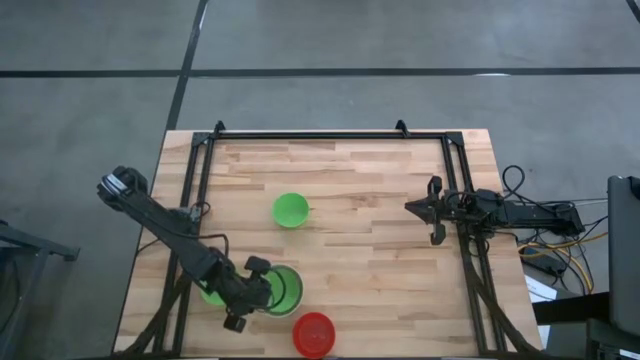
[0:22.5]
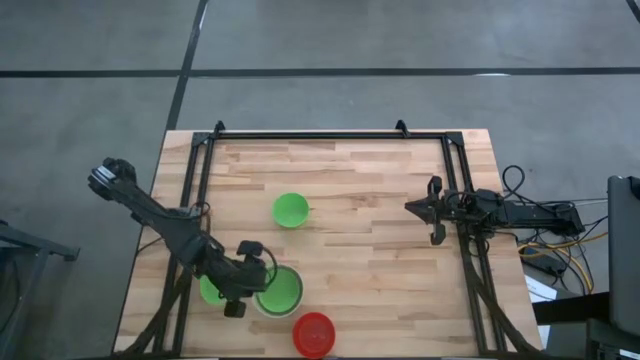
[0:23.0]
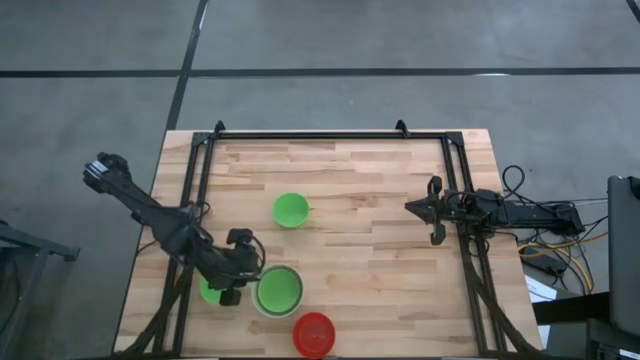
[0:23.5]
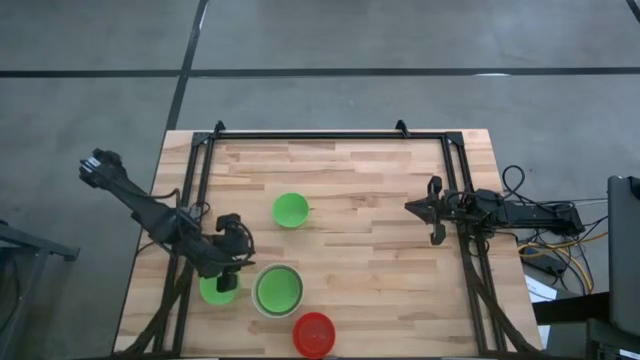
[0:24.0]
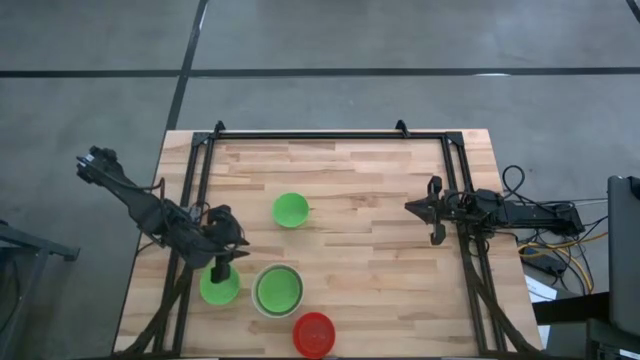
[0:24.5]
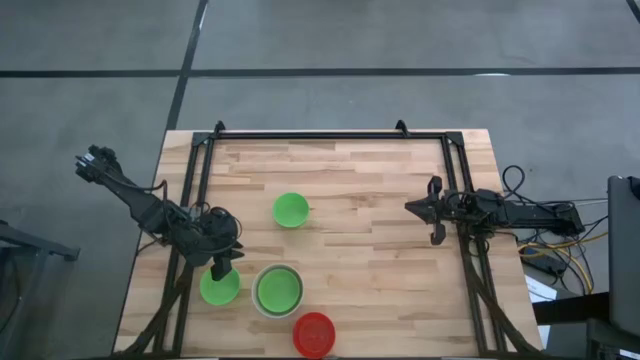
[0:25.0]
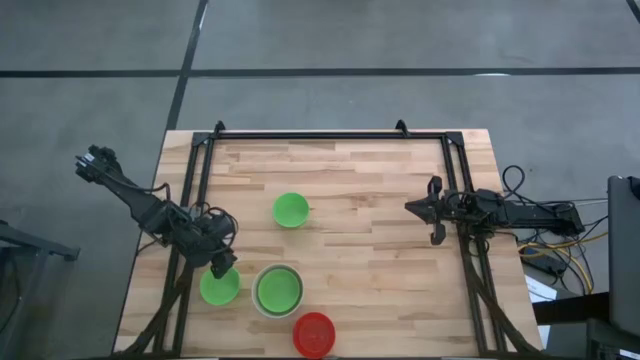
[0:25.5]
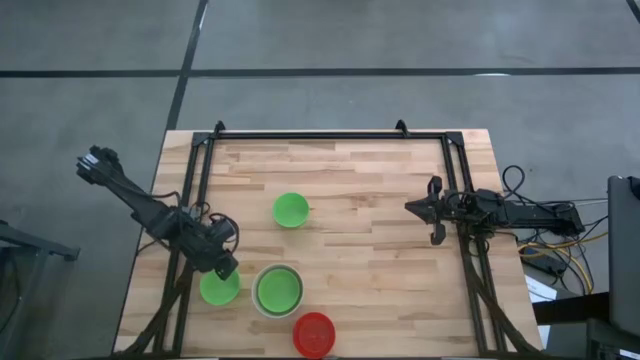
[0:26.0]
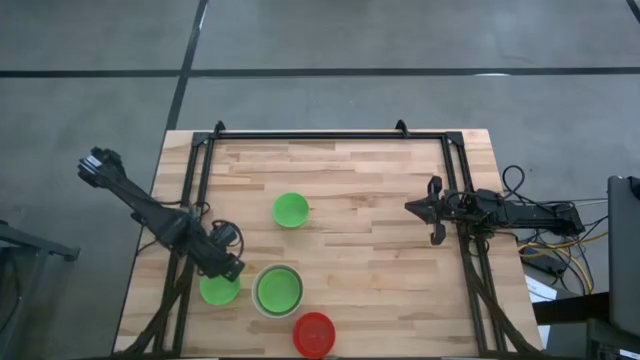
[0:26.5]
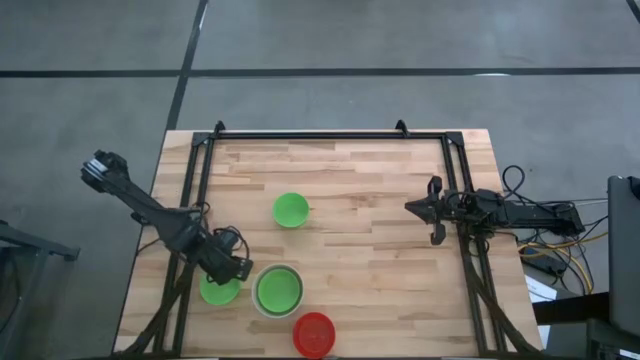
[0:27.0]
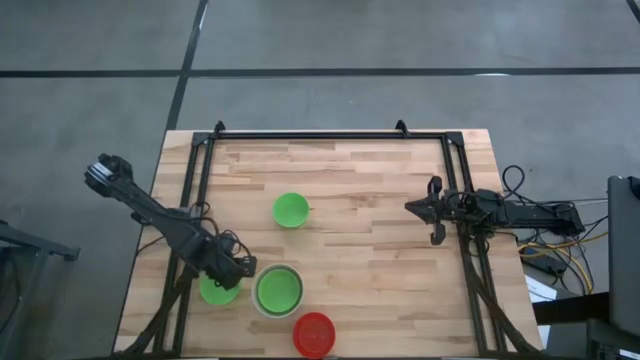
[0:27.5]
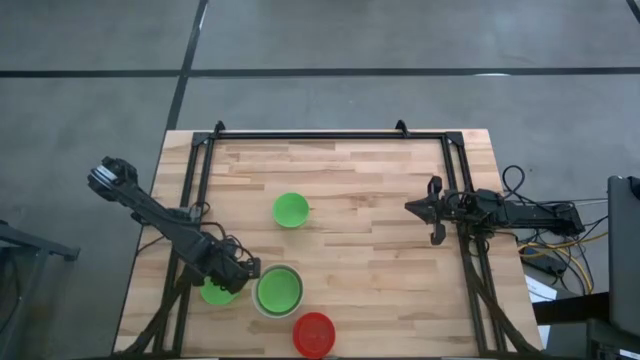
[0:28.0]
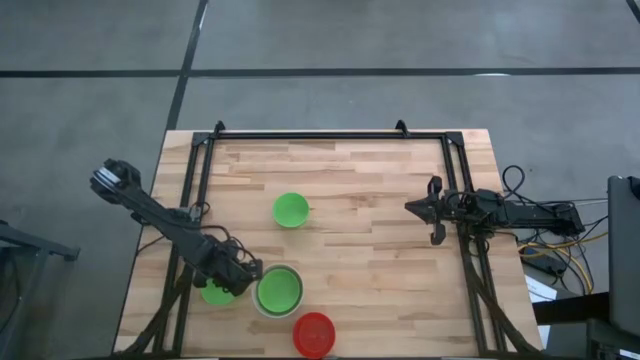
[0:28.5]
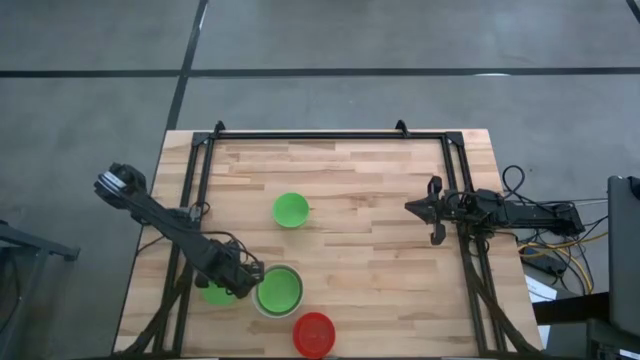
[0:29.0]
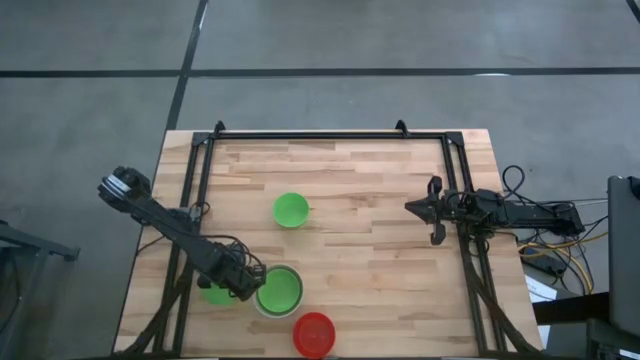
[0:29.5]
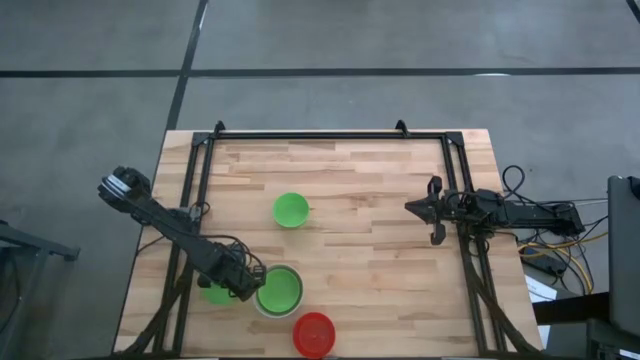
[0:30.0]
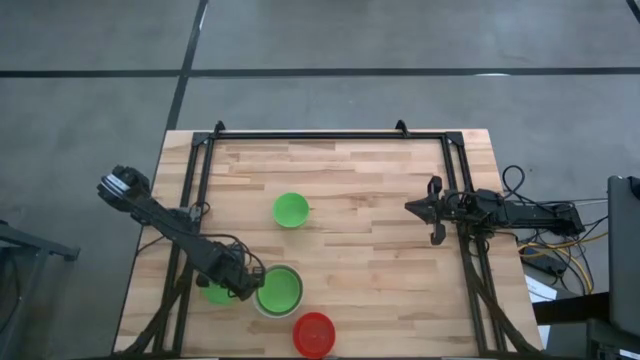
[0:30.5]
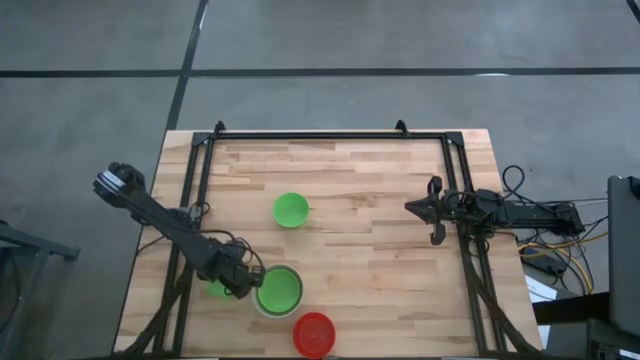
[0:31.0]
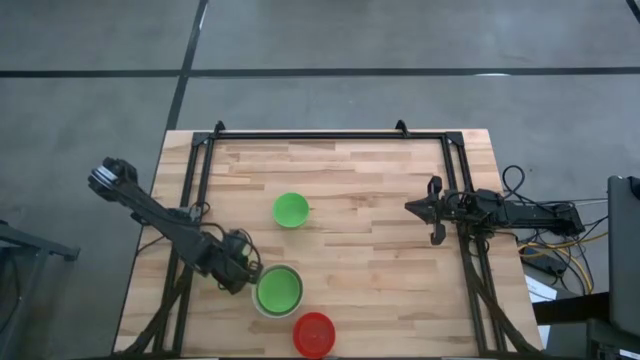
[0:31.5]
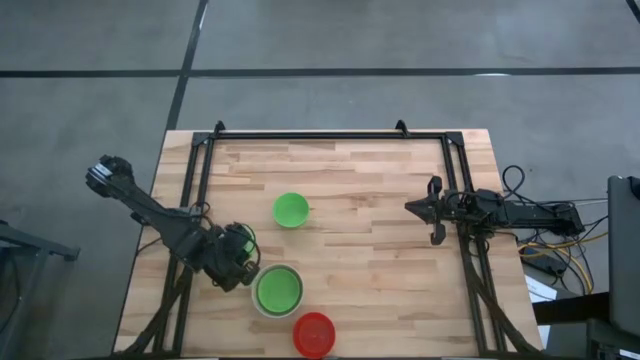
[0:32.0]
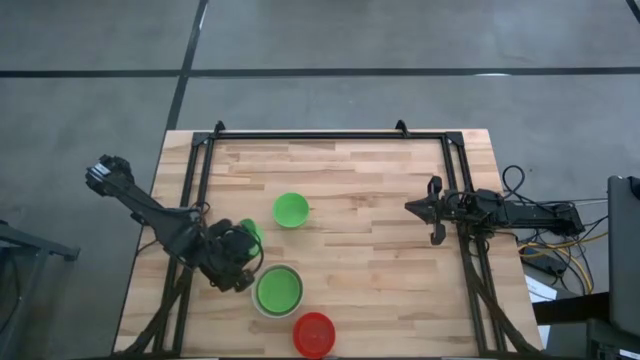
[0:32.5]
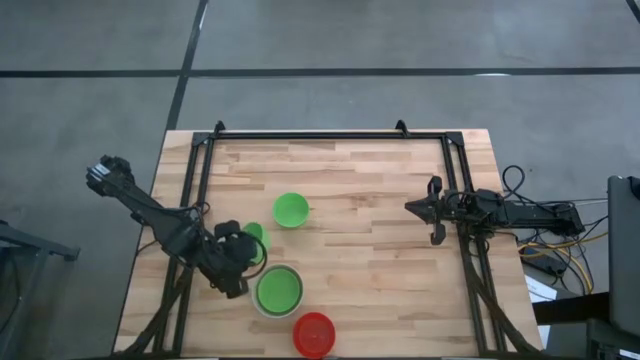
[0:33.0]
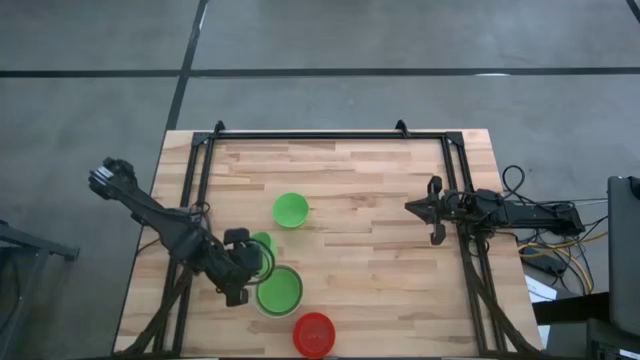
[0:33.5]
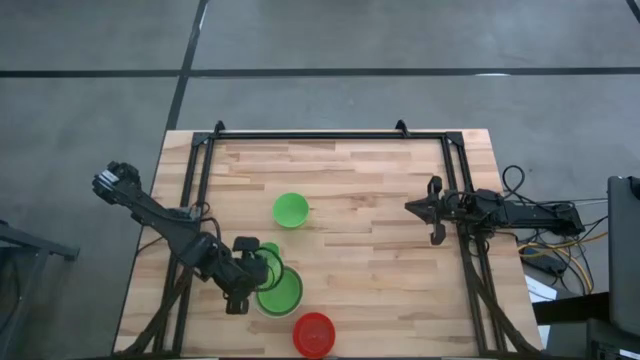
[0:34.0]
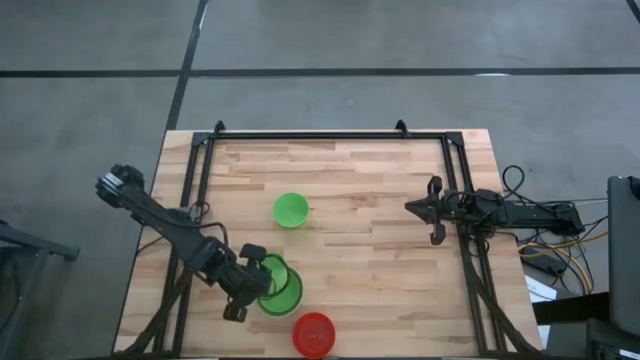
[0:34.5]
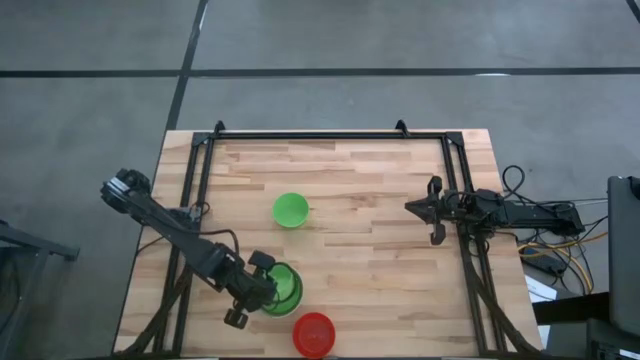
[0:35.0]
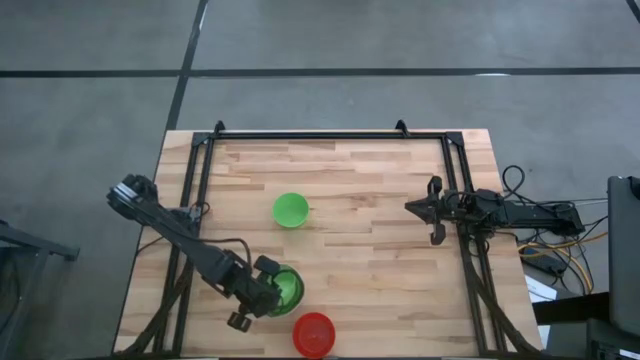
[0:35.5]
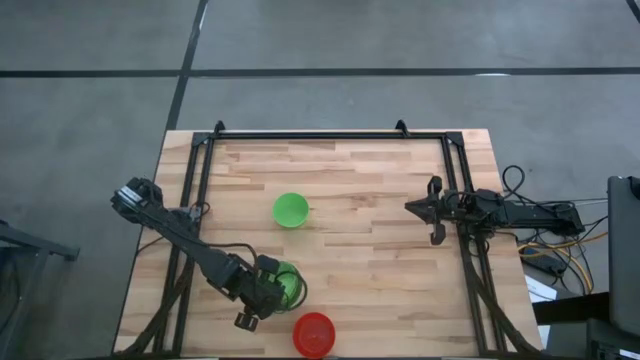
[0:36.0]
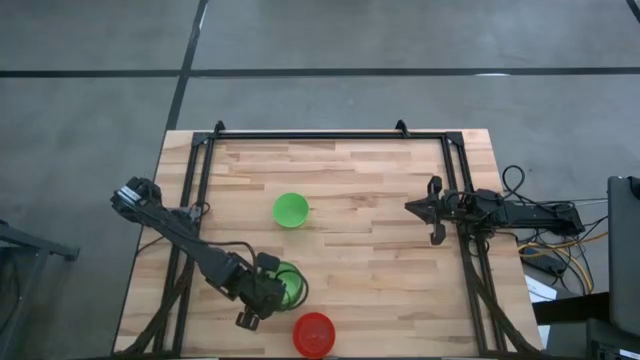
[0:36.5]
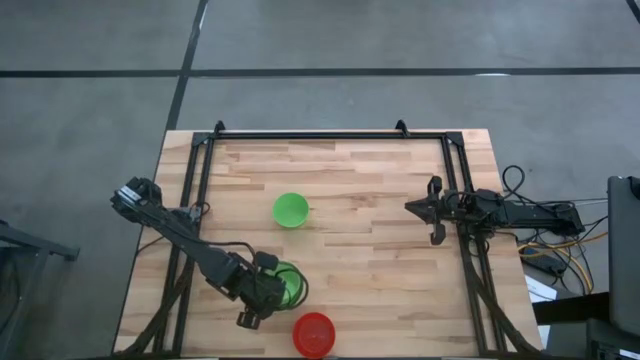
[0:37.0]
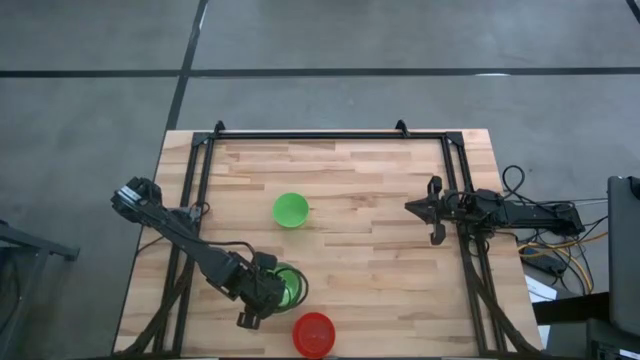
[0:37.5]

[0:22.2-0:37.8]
Stack the bottom green bowl on the green bowl

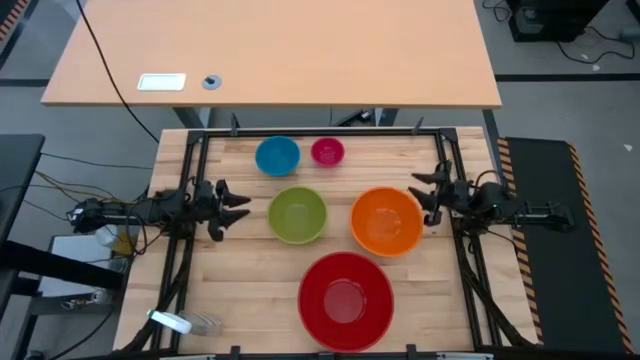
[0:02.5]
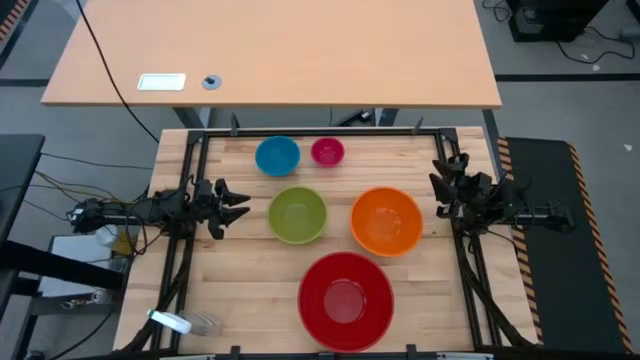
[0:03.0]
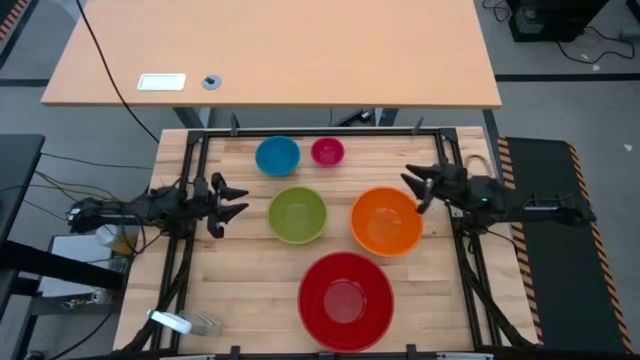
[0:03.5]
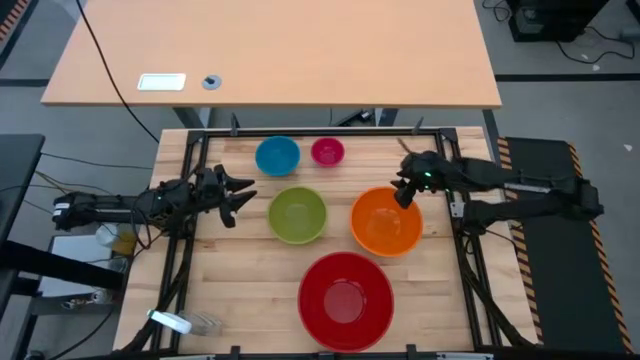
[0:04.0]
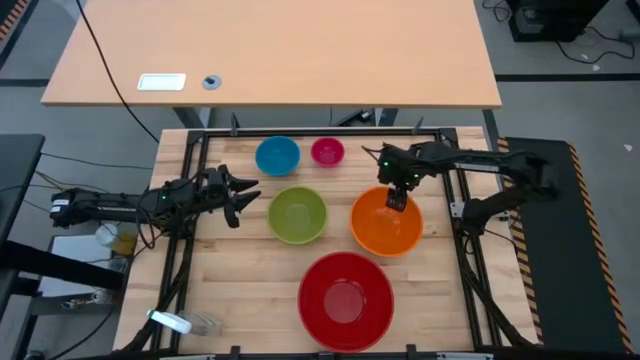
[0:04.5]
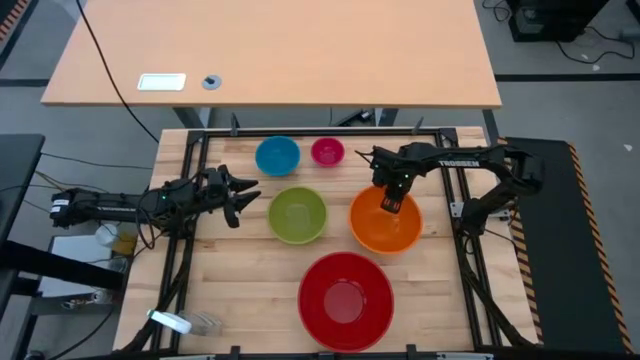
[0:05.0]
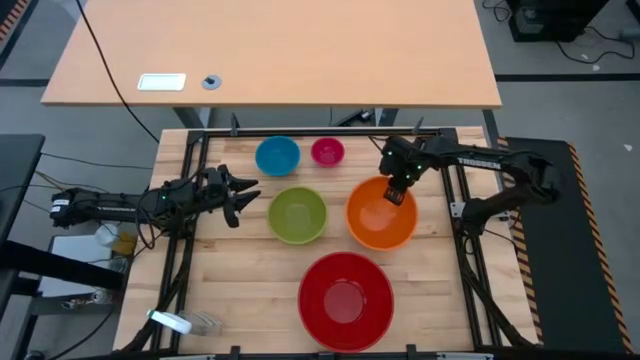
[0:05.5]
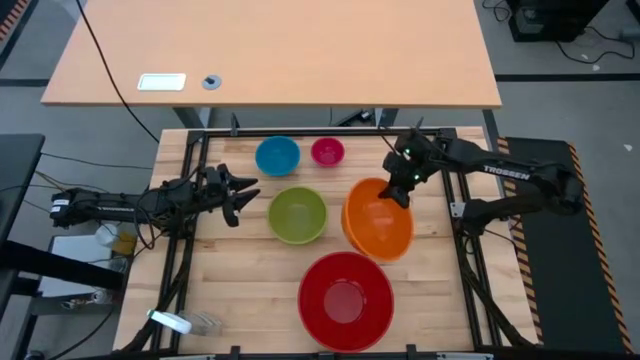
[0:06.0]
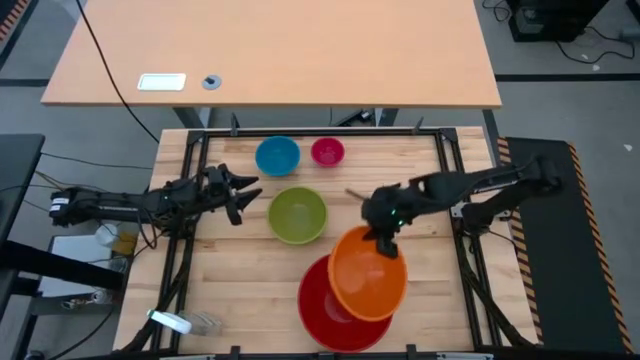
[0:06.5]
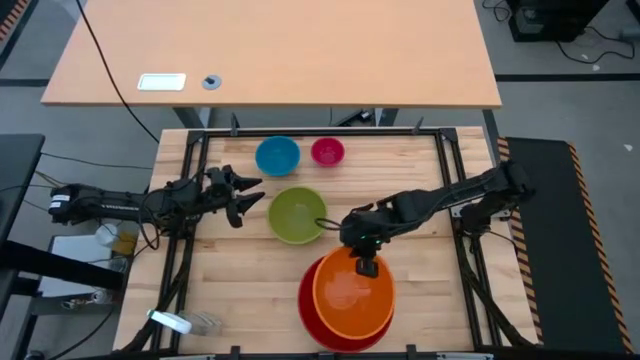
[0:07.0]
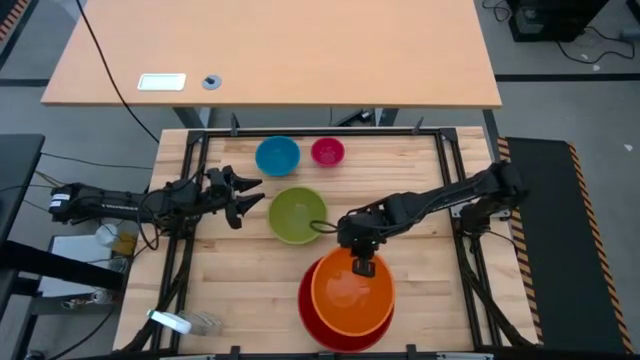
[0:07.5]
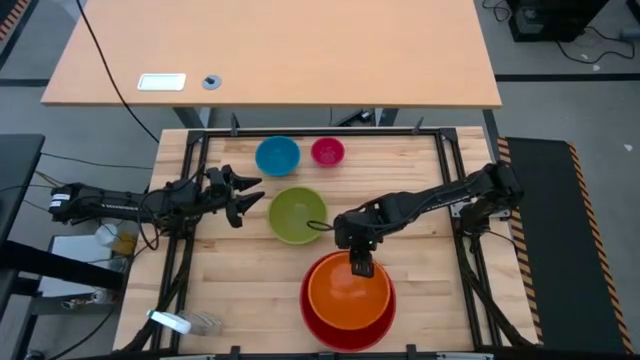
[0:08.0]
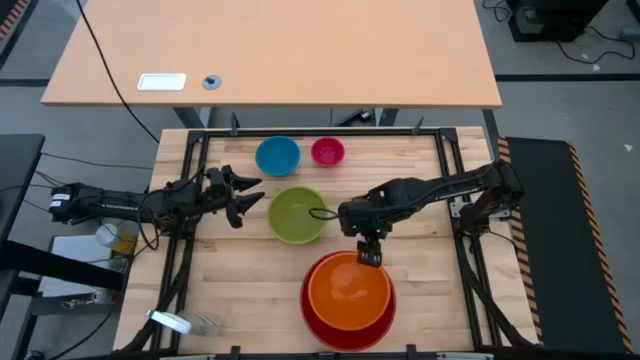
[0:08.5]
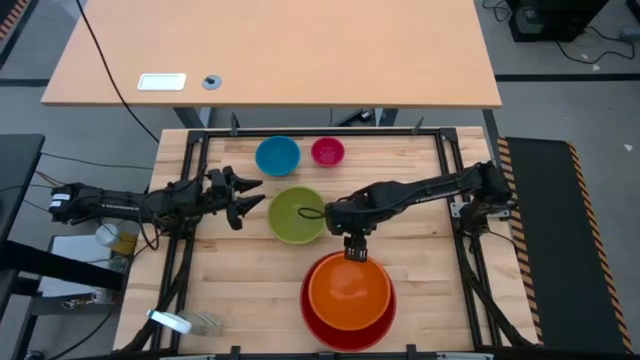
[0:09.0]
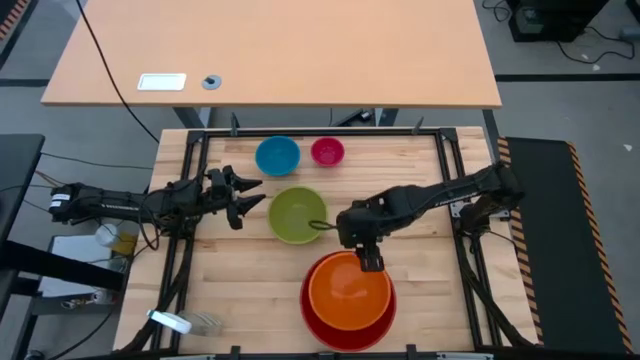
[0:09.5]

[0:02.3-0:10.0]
Stack the orange bowl on top of the red bowl
